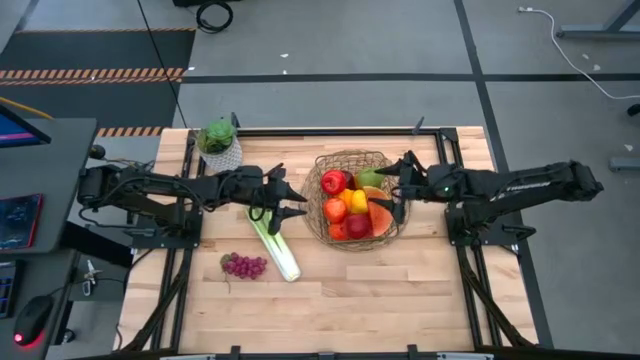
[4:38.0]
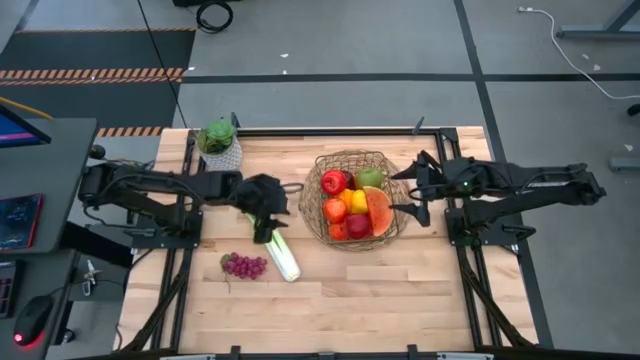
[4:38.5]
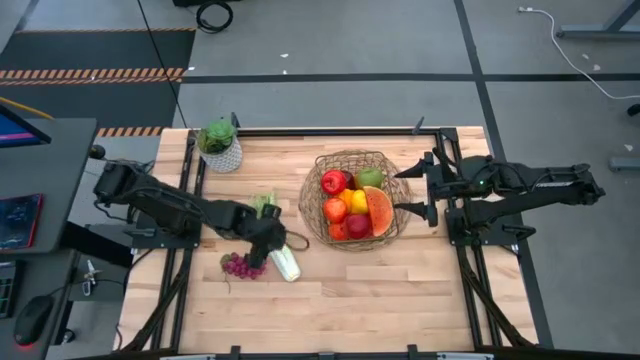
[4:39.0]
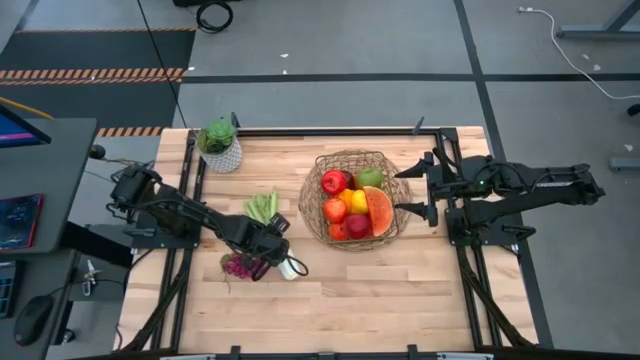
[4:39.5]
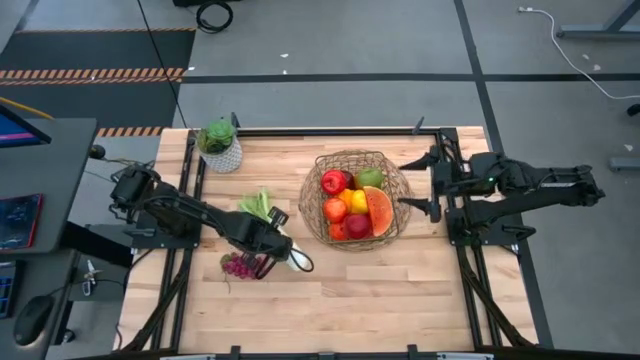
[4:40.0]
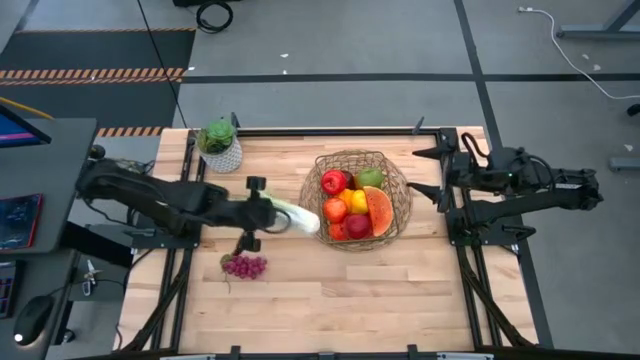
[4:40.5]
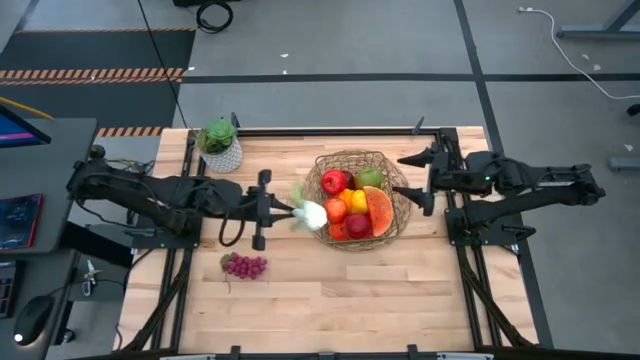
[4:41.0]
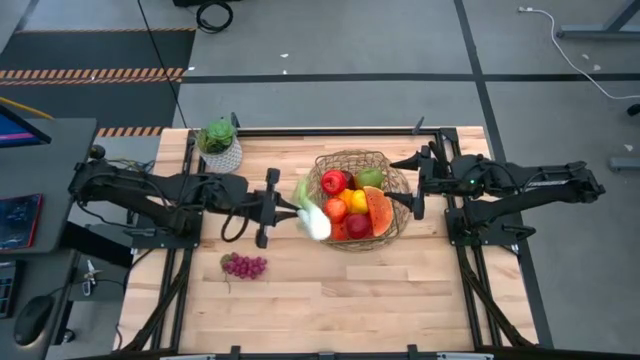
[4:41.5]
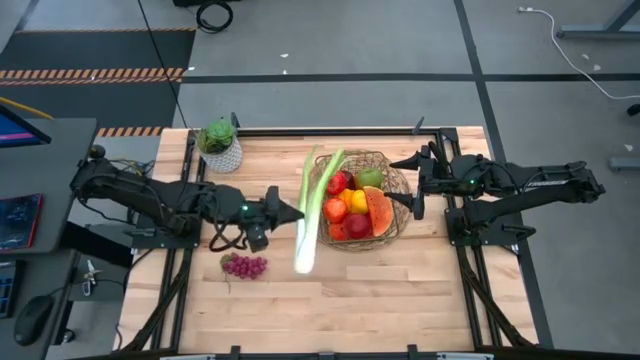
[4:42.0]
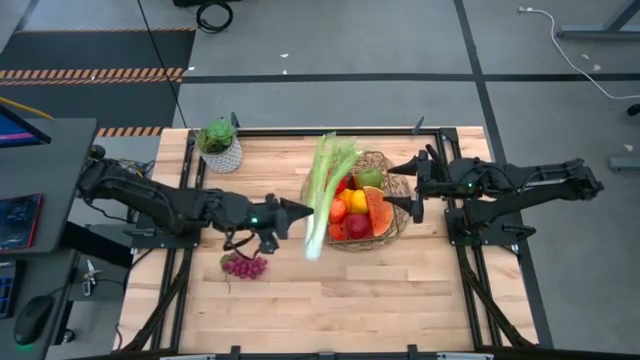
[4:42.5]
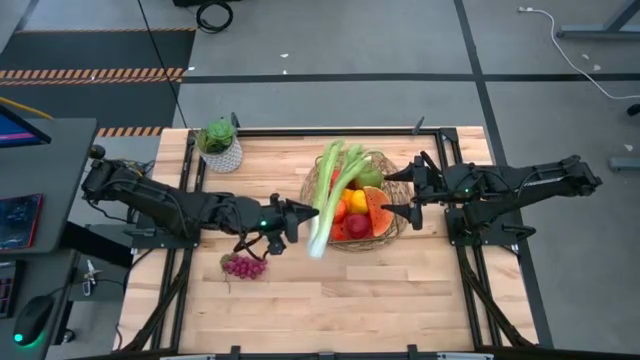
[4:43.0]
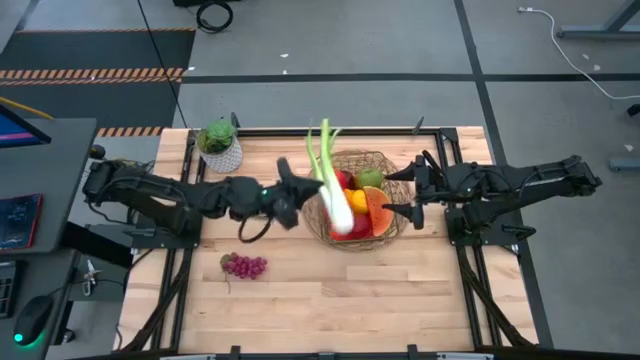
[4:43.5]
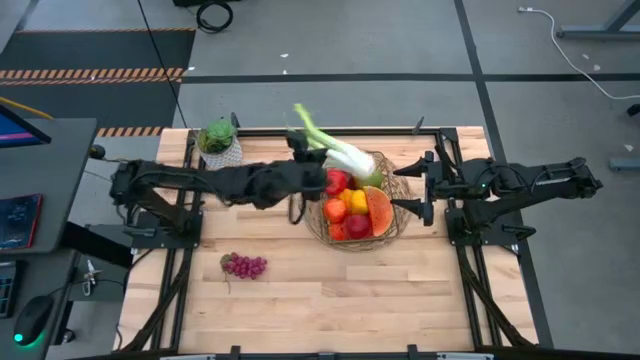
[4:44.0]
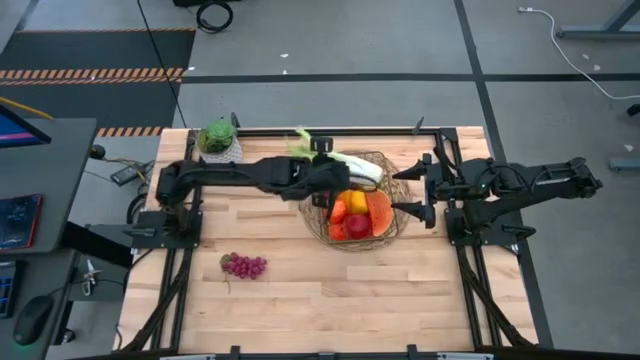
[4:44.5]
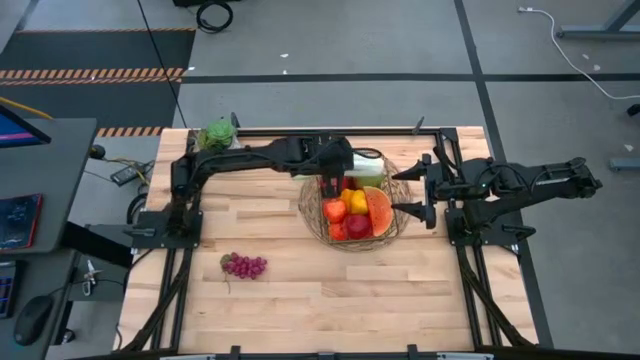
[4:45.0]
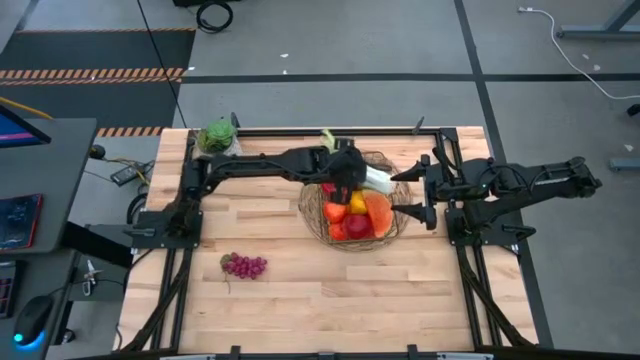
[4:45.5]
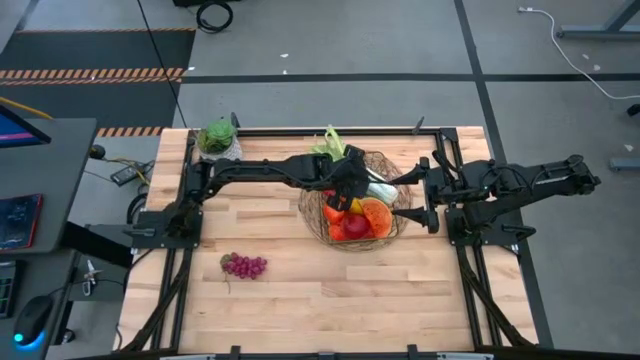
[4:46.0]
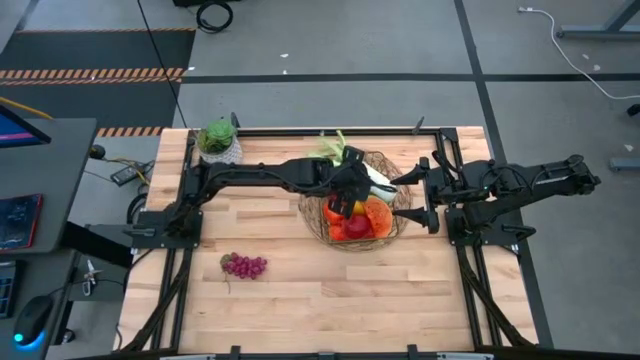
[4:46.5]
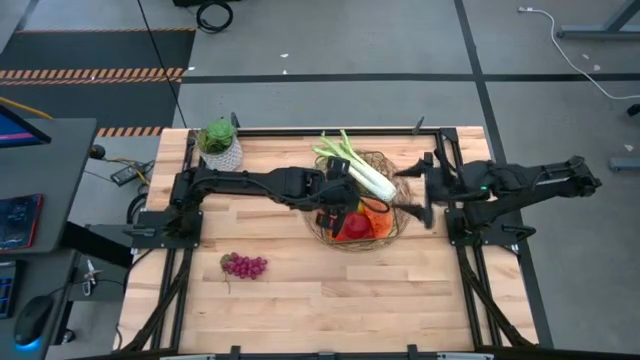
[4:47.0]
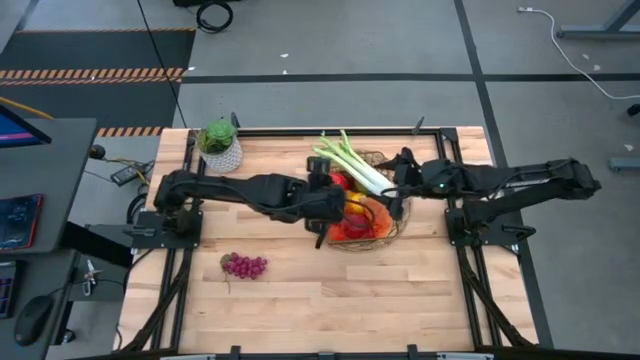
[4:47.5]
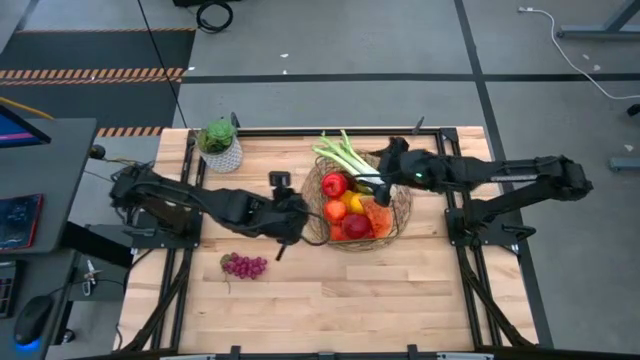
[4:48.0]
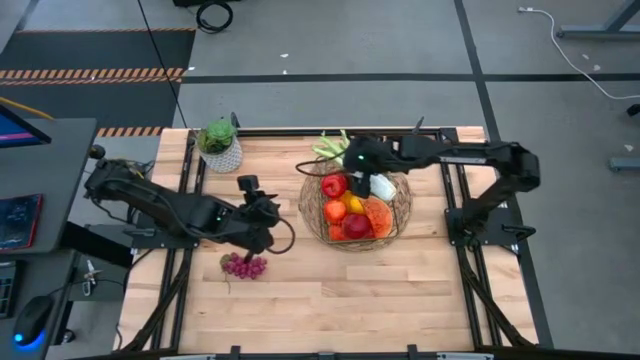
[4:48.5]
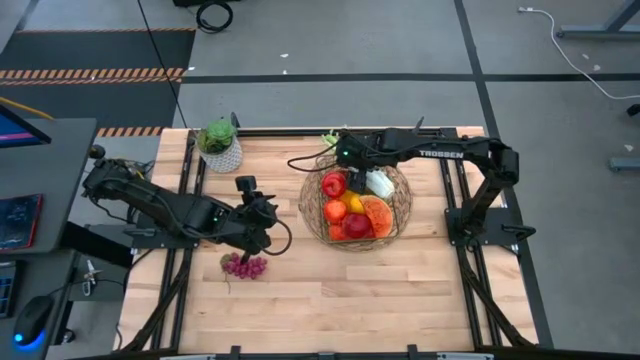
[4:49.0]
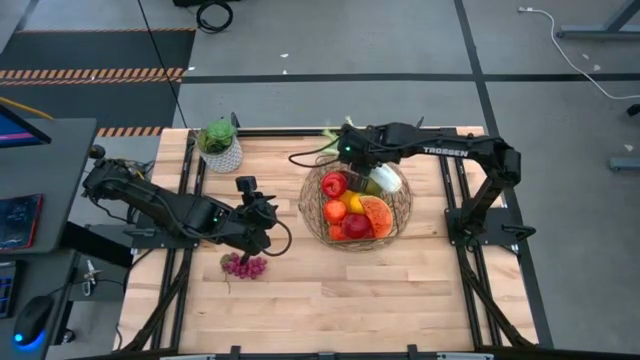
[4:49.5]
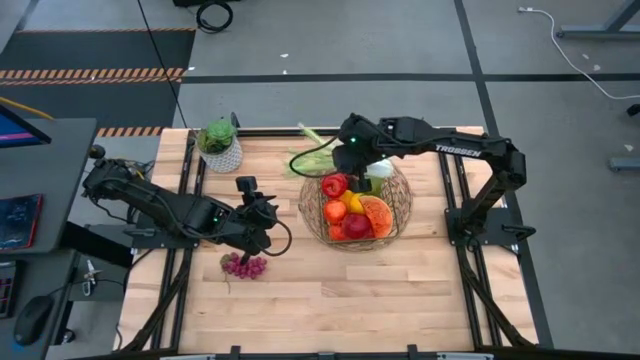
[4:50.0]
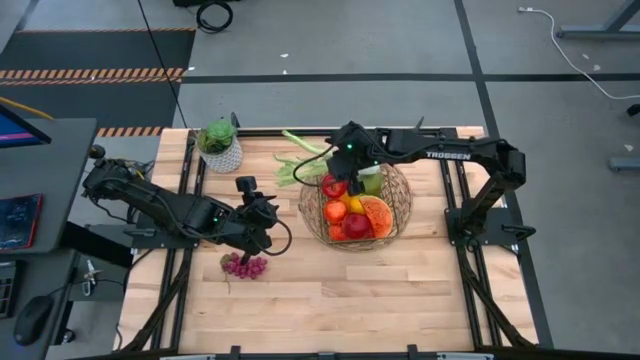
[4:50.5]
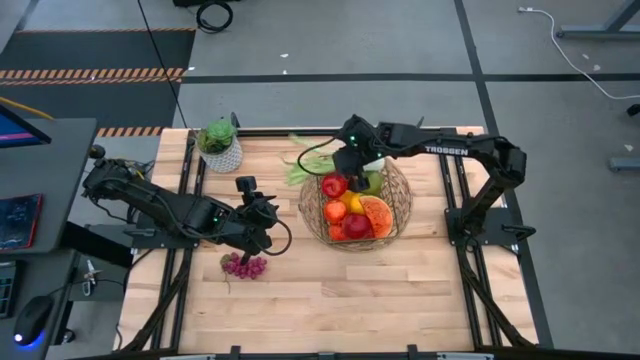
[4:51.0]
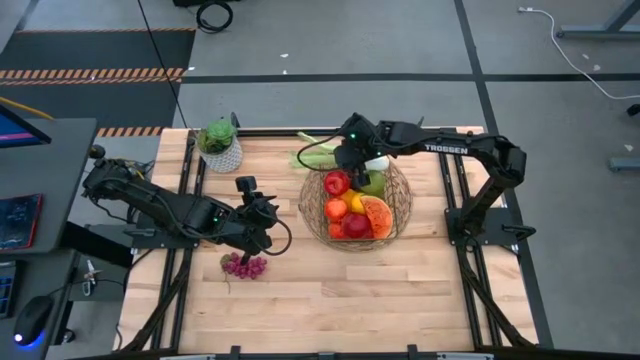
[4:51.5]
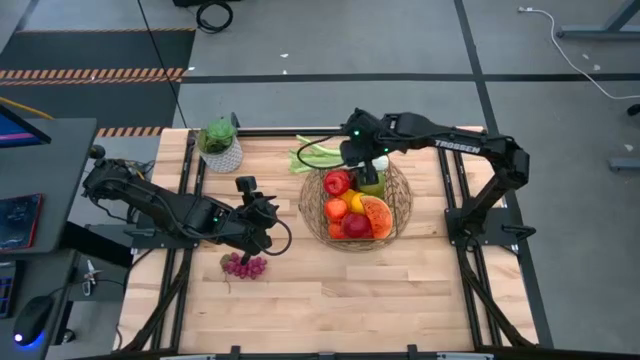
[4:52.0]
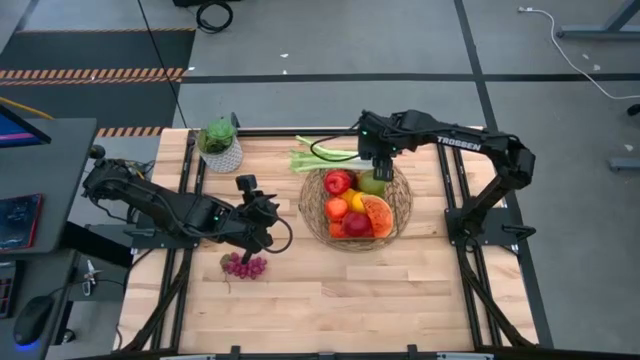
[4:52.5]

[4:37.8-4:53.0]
Task: Build produce basket
Put the green celery into the brown wire basket

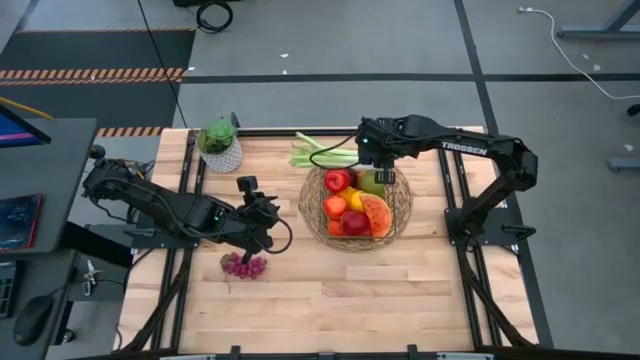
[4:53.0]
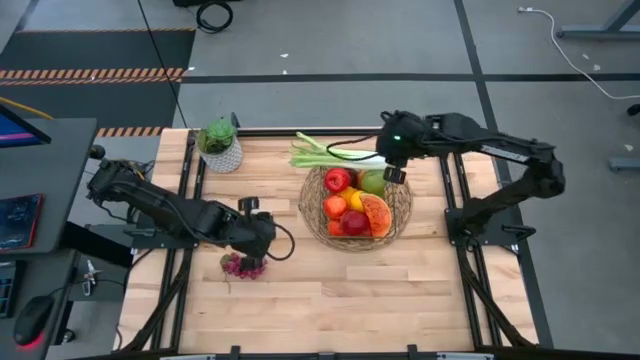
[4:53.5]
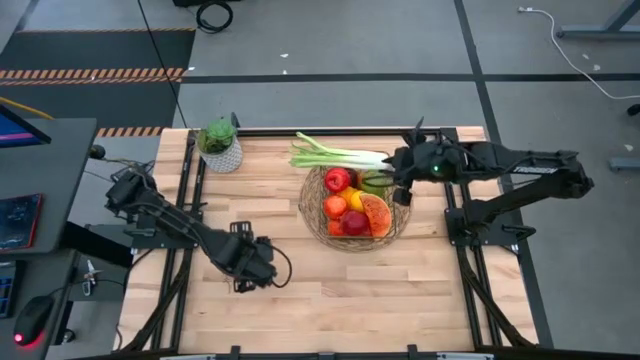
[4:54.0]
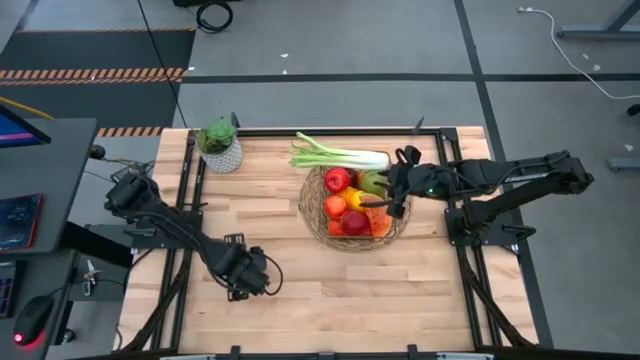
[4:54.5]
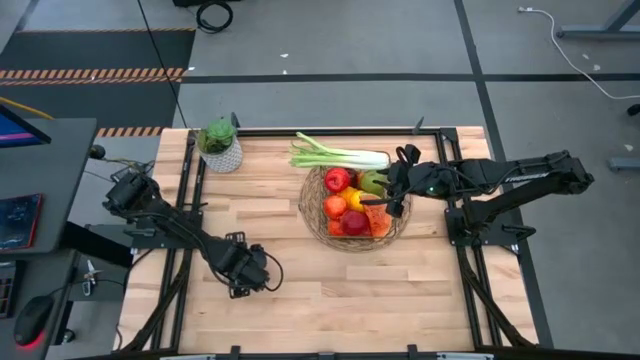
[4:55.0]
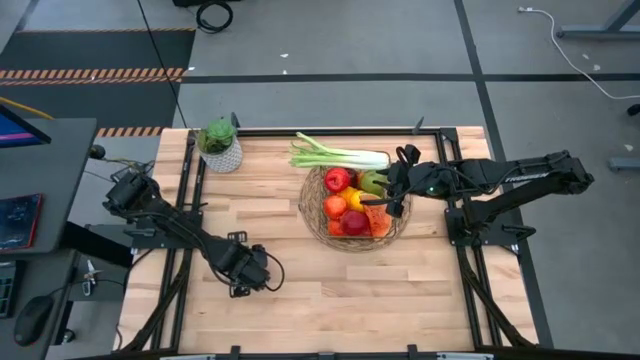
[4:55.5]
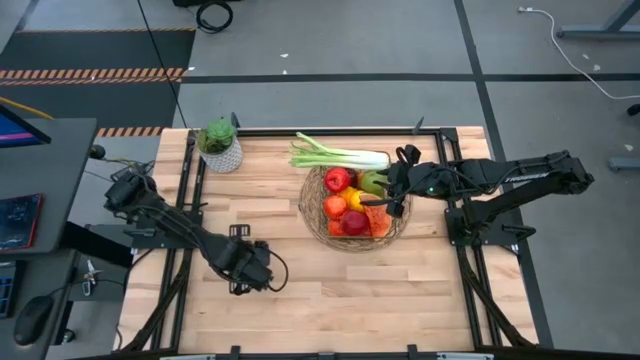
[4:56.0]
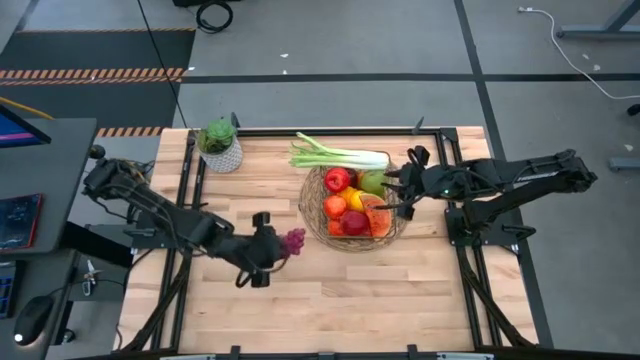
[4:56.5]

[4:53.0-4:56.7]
Put the purple grapes into the brown wire basket

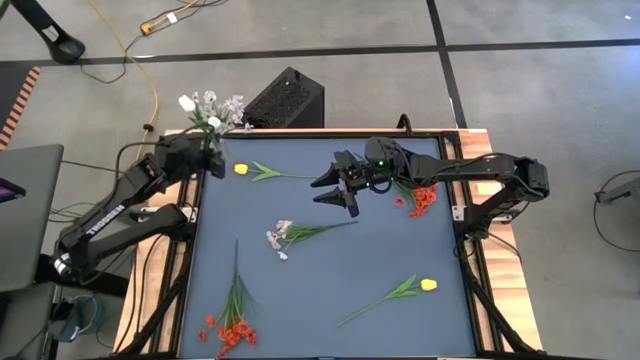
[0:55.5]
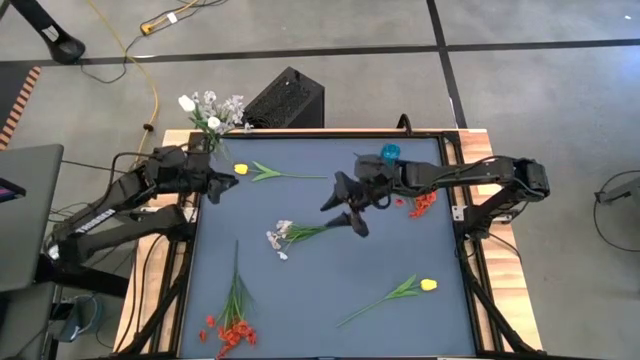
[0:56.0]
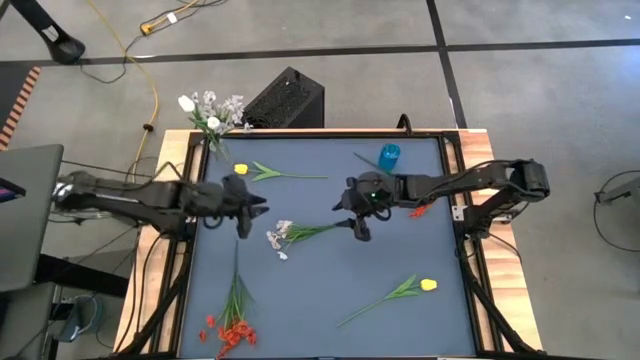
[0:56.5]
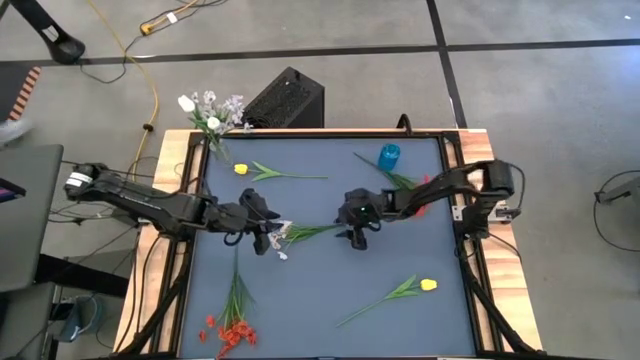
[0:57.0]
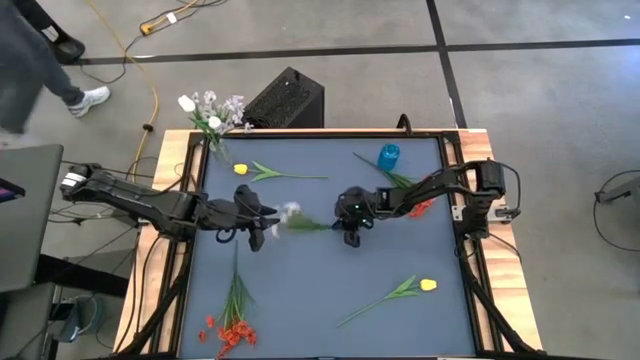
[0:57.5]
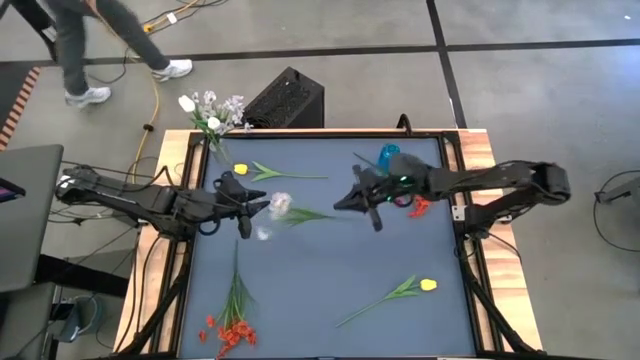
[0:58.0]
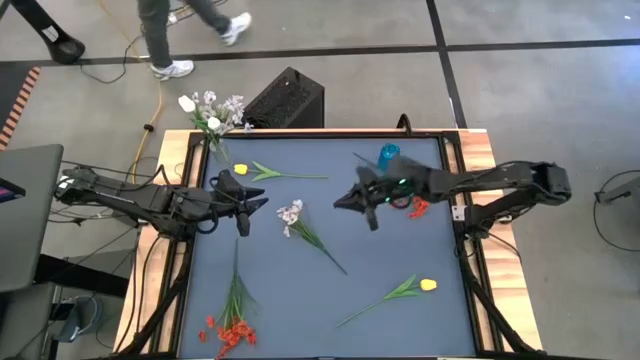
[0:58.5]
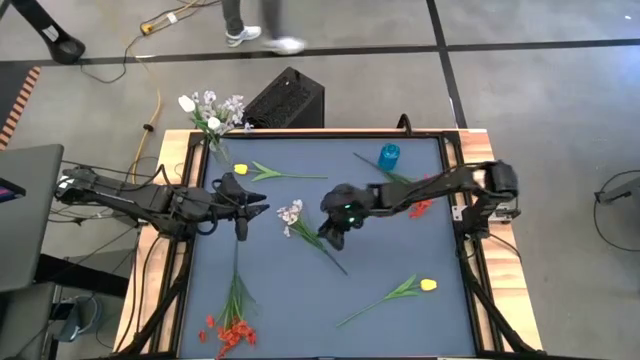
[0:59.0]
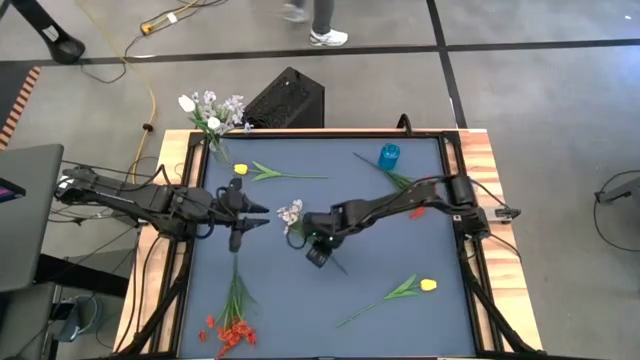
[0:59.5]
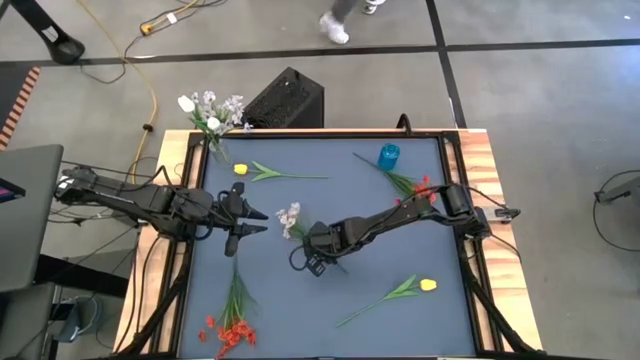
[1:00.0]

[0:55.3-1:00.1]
Task: Sort flowers into vase by color
Put the white flower into the transparent vase
